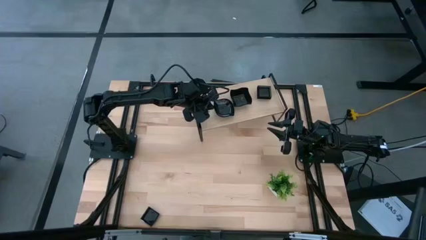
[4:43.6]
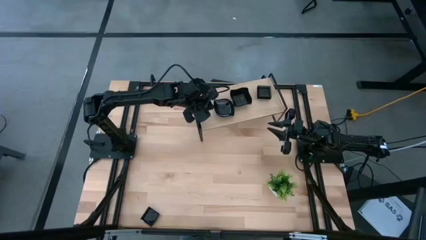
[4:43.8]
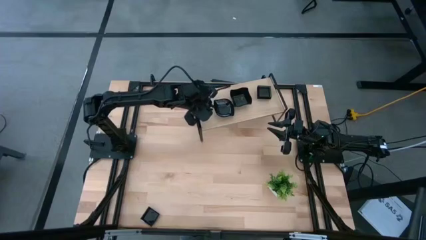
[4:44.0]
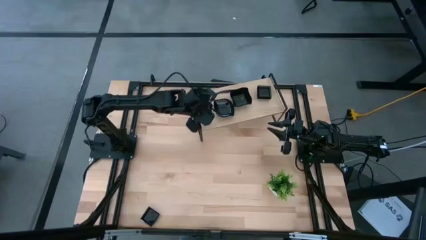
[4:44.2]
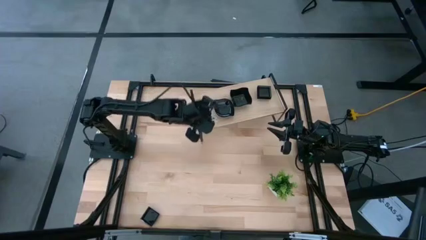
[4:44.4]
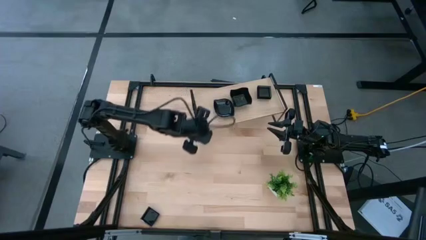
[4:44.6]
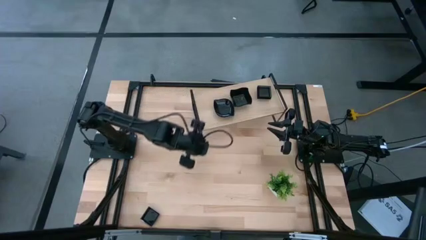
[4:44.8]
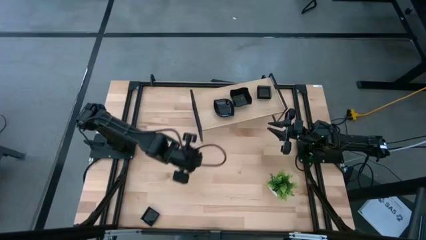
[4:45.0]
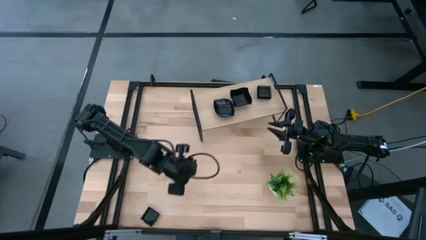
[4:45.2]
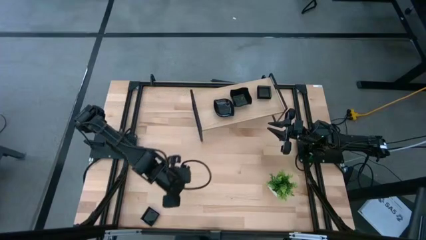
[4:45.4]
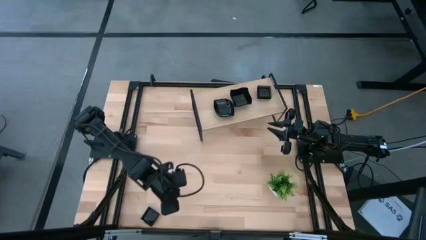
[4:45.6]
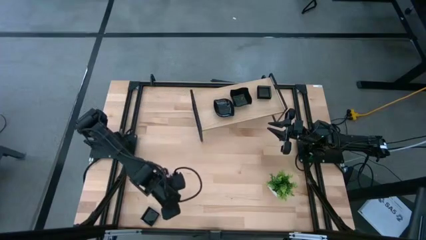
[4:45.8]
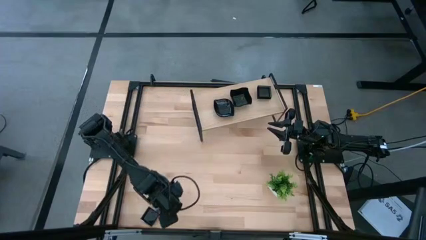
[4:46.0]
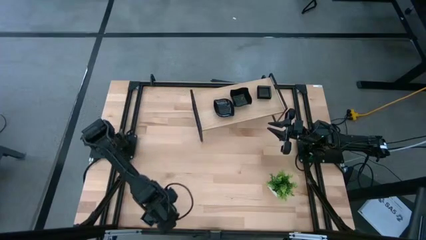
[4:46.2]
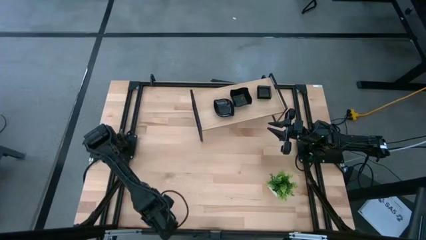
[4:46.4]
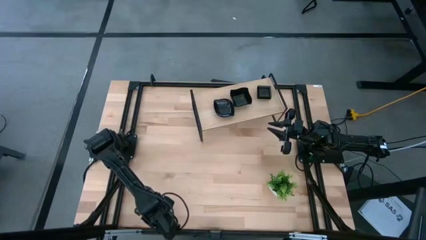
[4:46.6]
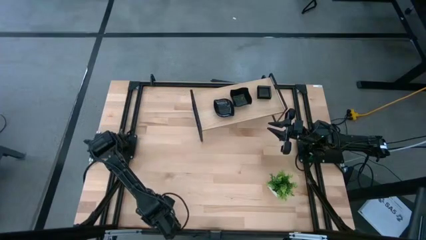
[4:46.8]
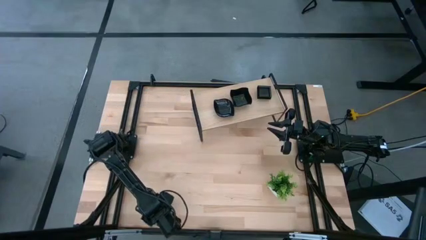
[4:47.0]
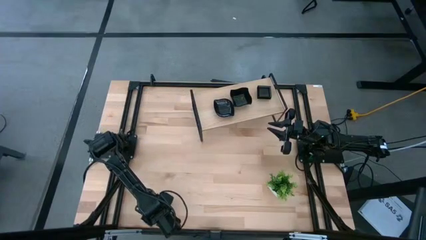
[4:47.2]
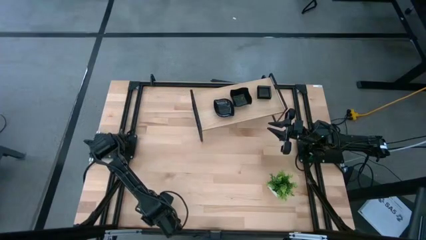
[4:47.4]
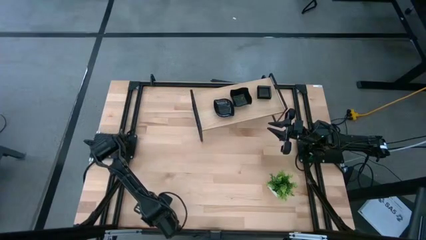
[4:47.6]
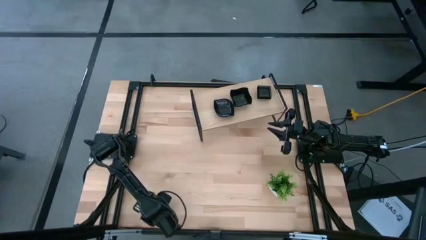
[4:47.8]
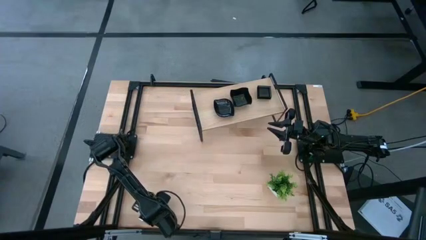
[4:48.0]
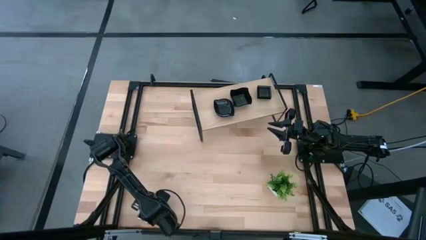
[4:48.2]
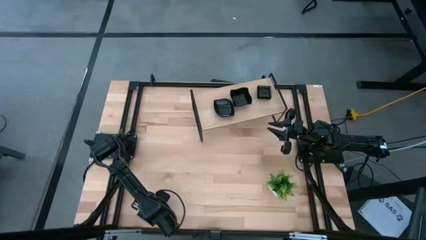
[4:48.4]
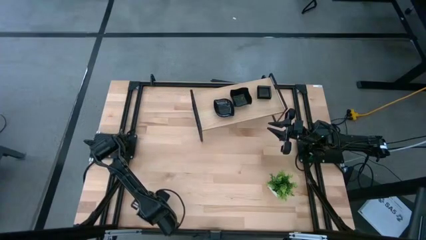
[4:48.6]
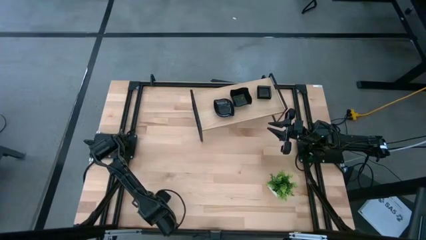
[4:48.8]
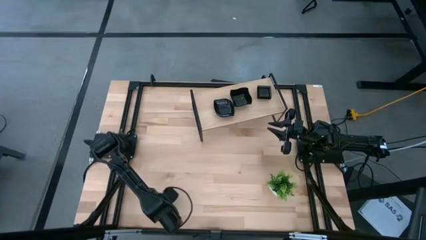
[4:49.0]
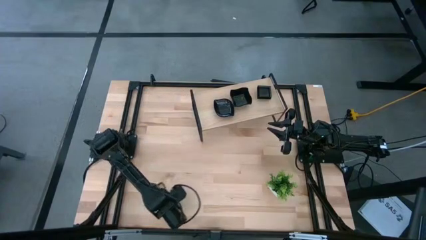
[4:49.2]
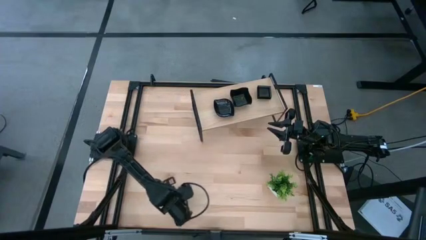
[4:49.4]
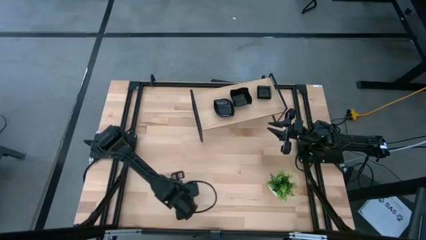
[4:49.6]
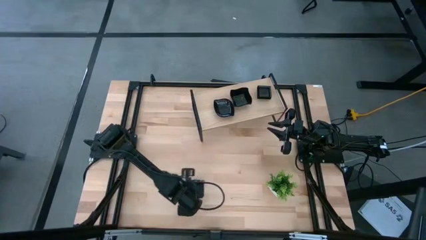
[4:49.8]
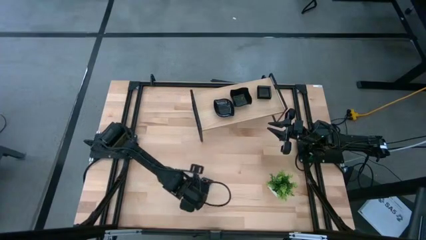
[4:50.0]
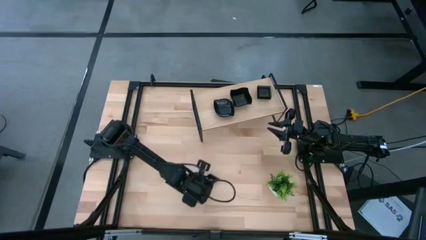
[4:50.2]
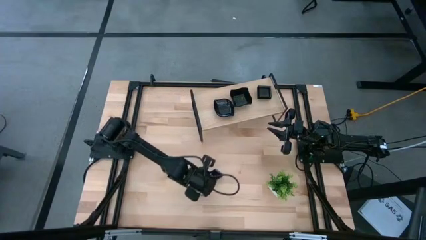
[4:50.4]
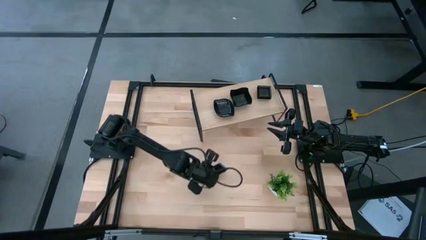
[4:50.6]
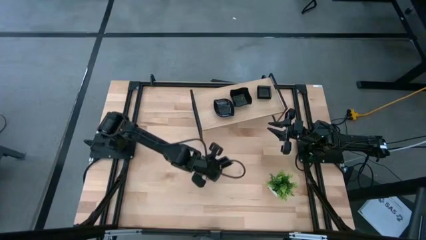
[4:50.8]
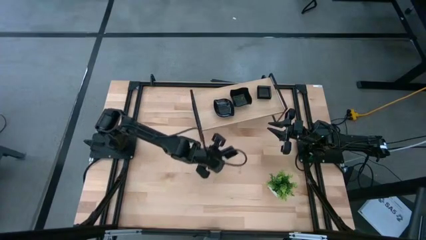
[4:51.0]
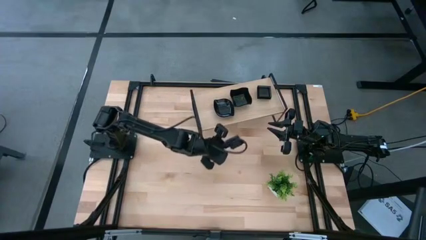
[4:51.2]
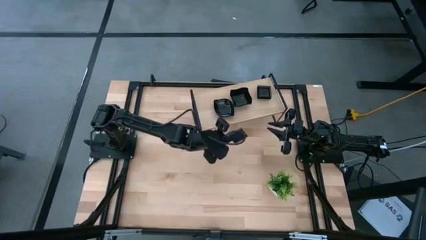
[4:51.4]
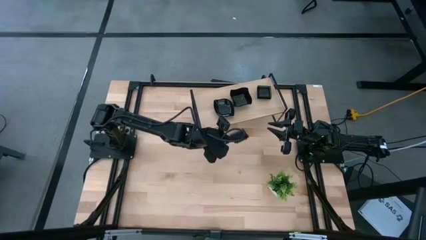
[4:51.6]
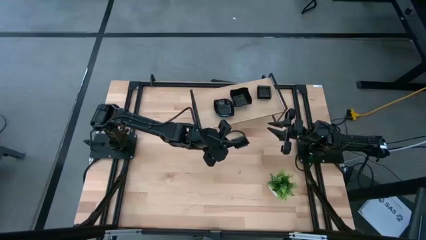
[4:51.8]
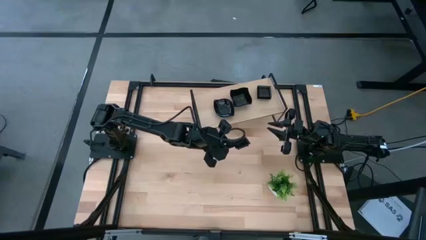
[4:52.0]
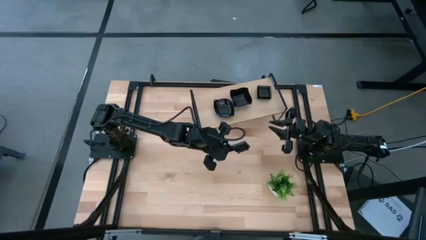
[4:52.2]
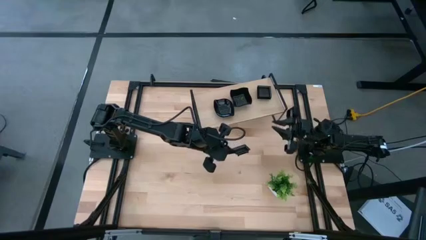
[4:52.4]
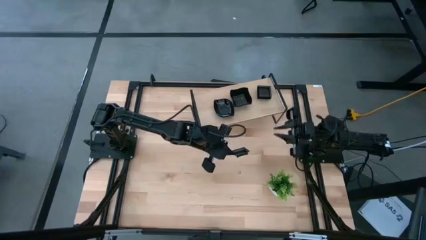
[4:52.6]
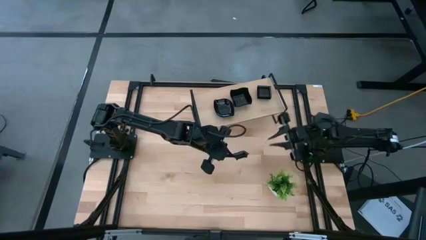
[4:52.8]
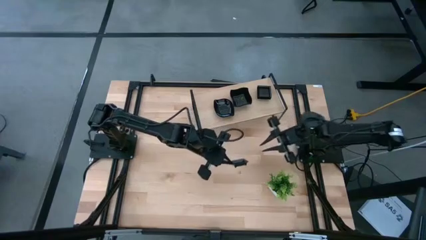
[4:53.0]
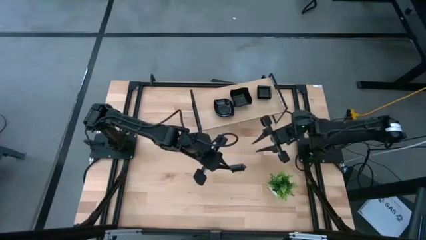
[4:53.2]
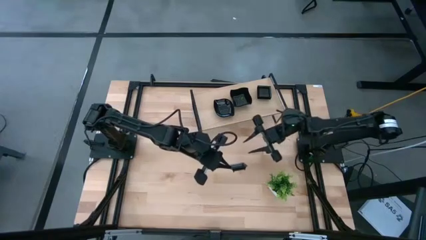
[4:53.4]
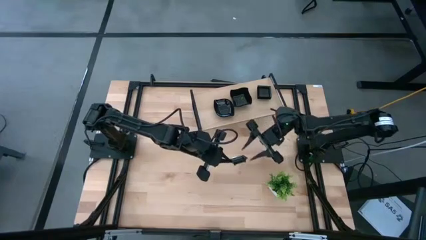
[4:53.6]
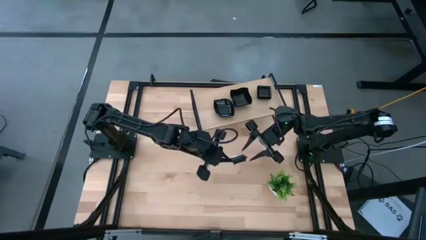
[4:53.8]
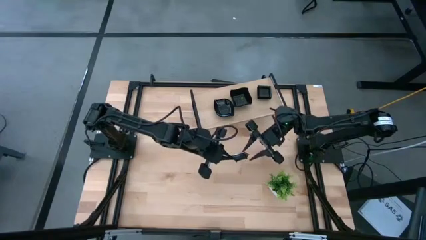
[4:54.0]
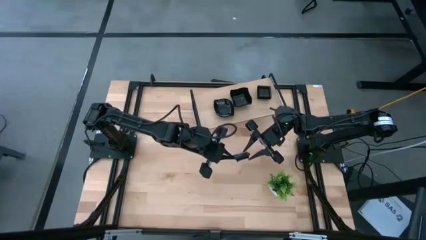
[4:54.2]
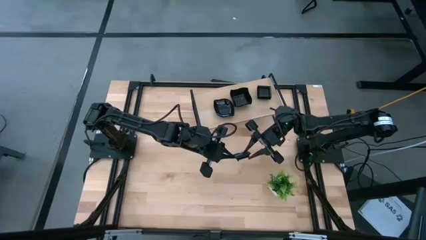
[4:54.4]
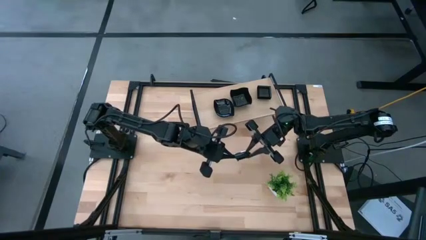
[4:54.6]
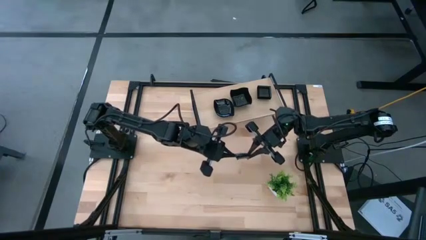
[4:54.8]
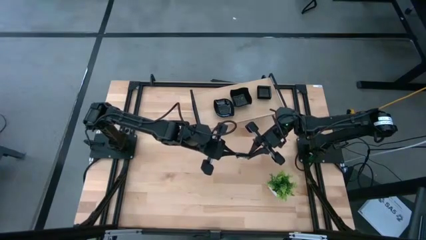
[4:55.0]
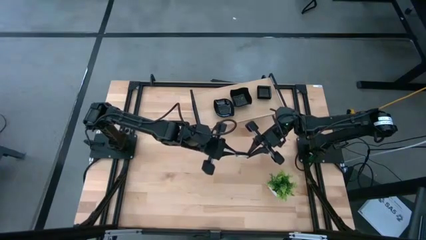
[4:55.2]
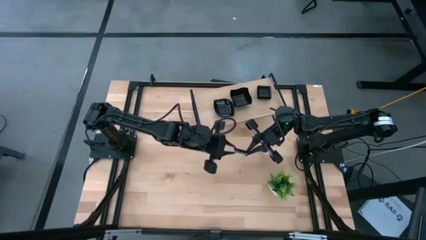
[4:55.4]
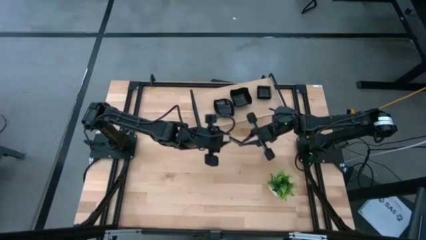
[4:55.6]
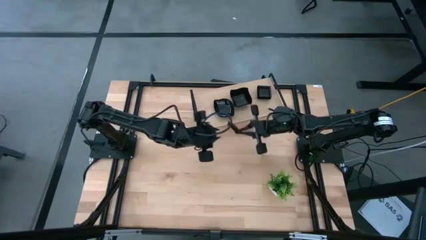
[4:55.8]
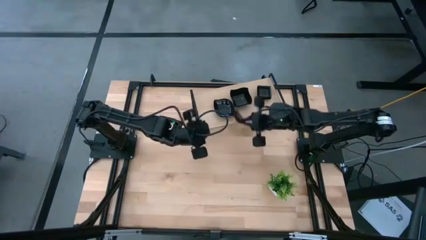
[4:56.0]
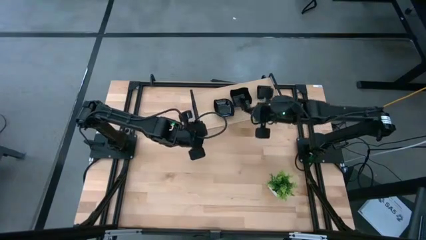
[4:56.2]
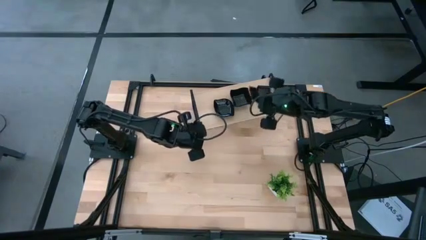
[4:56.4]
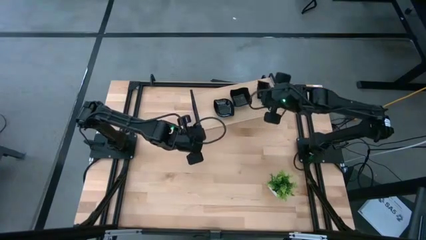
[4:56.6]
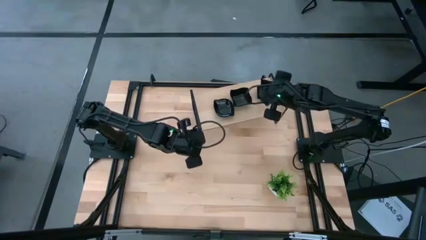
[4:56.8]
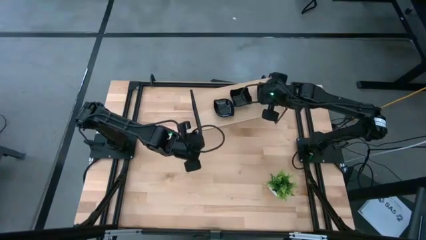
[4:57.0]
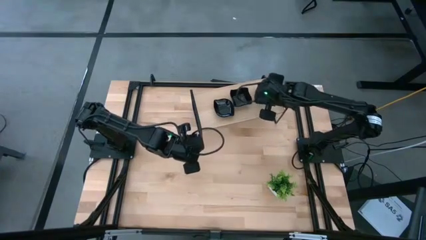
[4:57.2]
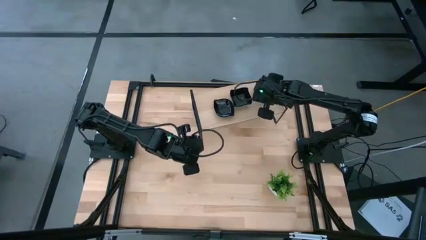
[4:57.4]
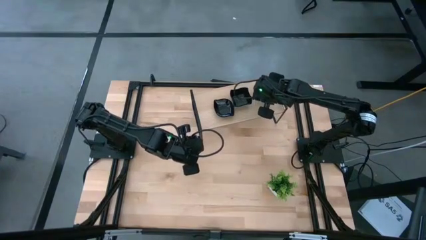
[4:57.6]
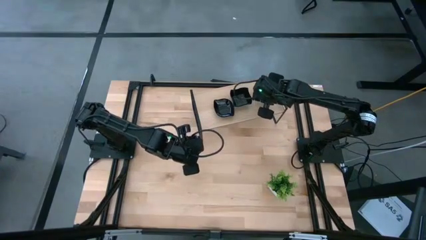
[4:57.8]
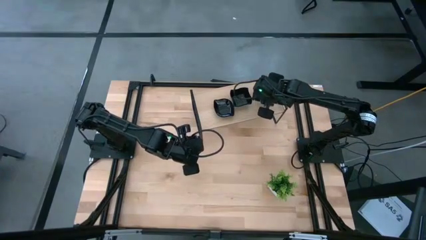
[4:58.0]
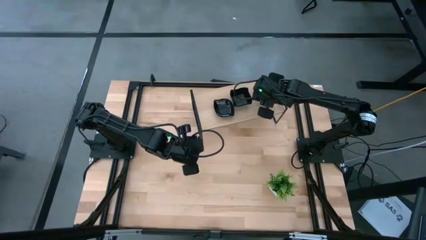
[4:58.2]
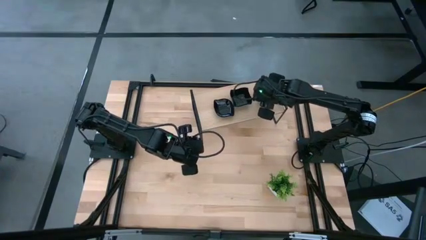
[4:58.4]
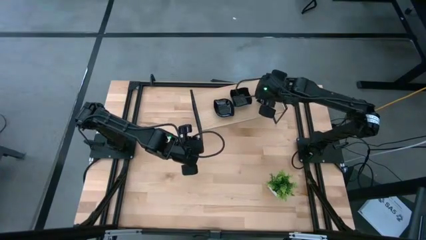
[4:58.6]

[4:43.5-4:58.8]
Task: Pick & Place Mini shaped plates
Stack the square plate on top of the square plate on the shelf
